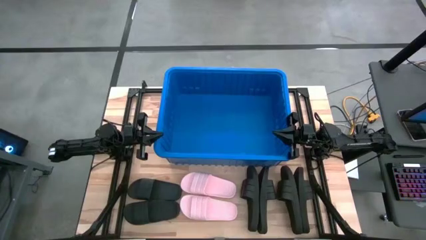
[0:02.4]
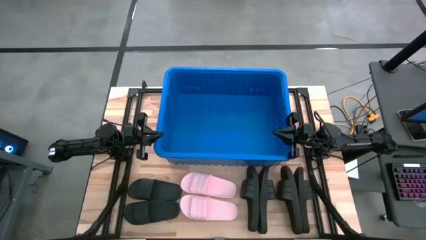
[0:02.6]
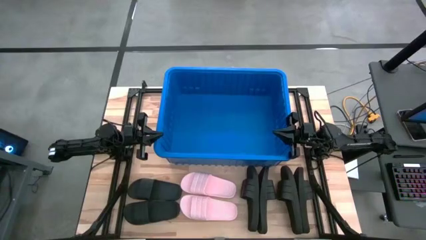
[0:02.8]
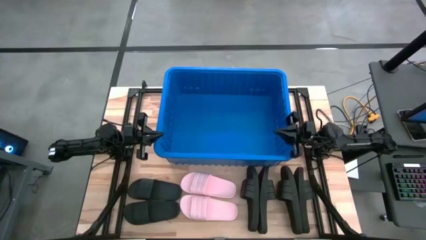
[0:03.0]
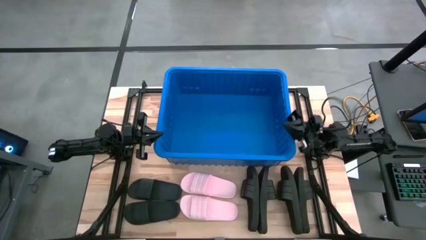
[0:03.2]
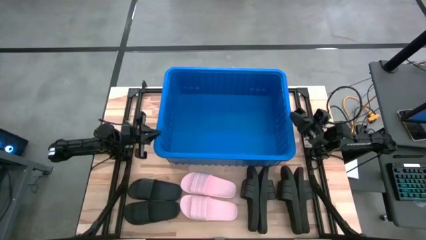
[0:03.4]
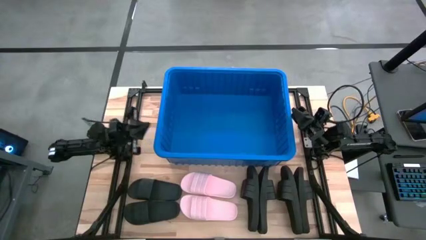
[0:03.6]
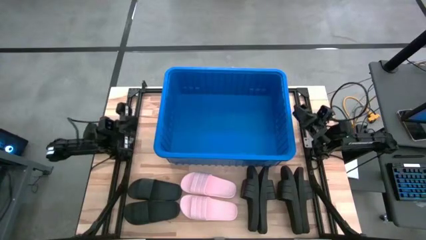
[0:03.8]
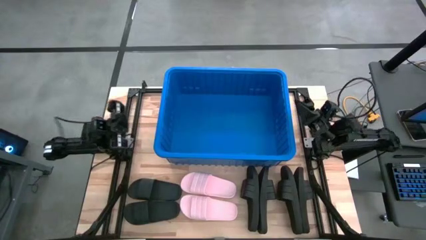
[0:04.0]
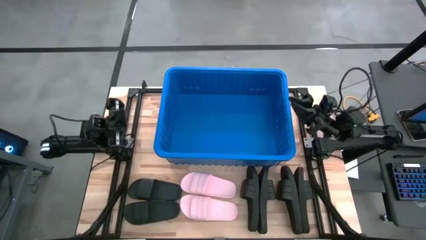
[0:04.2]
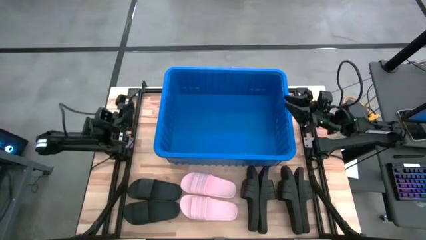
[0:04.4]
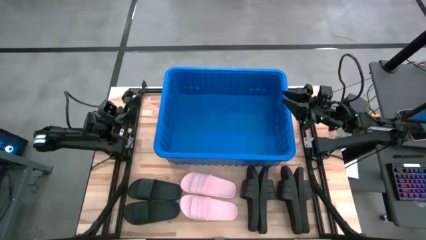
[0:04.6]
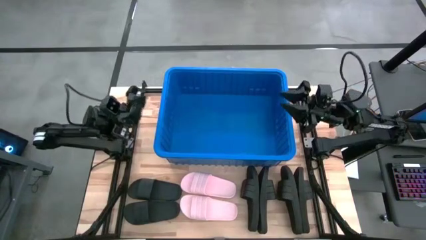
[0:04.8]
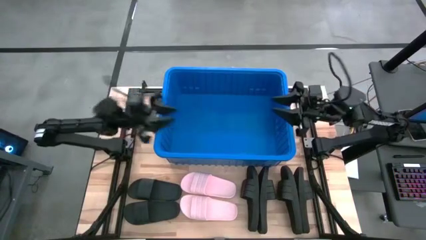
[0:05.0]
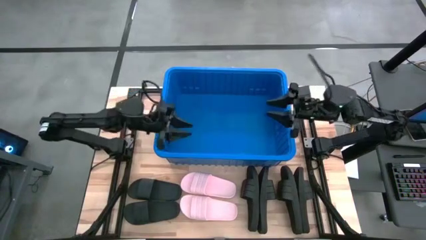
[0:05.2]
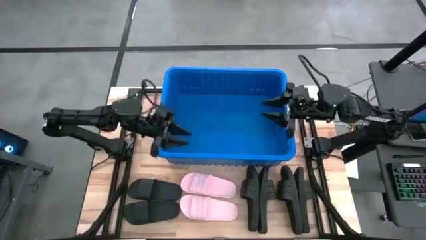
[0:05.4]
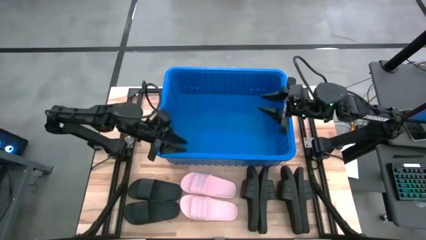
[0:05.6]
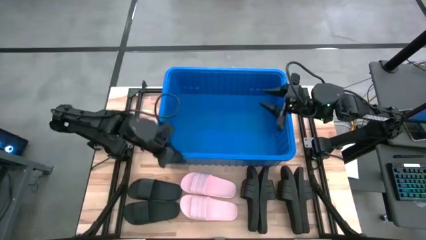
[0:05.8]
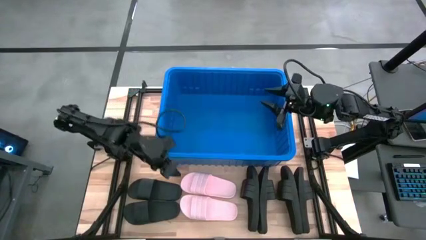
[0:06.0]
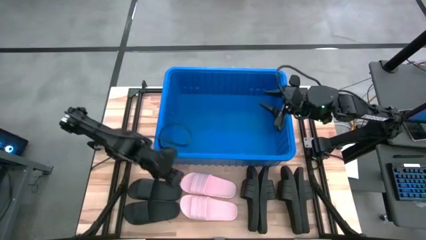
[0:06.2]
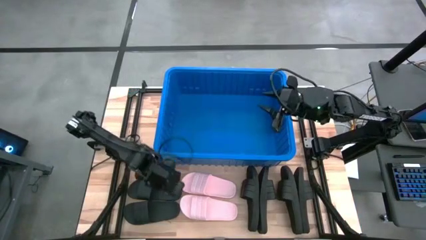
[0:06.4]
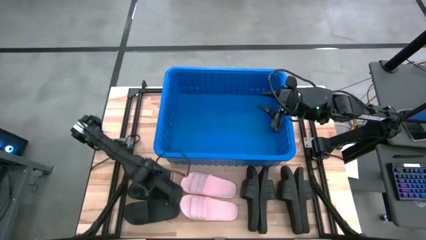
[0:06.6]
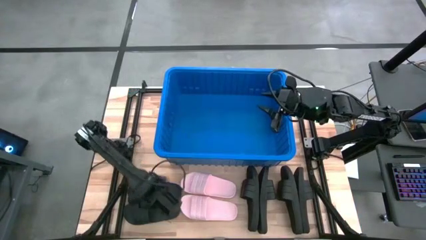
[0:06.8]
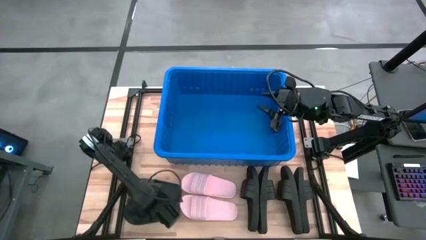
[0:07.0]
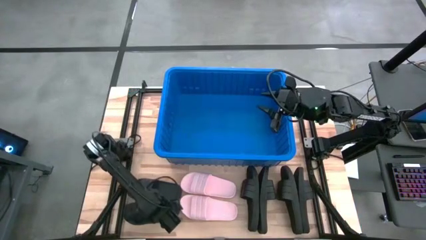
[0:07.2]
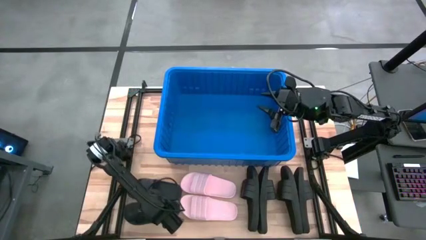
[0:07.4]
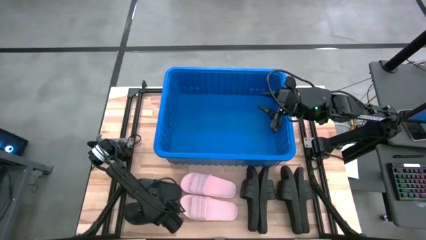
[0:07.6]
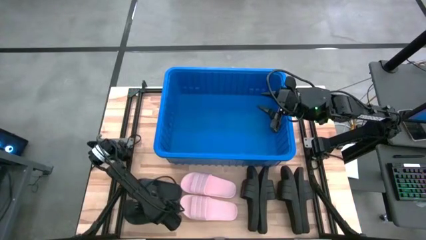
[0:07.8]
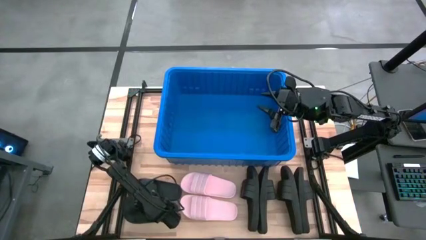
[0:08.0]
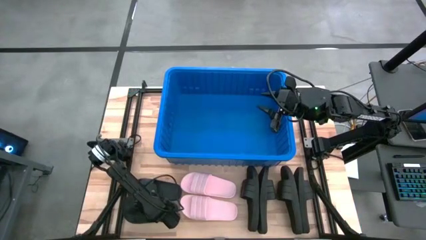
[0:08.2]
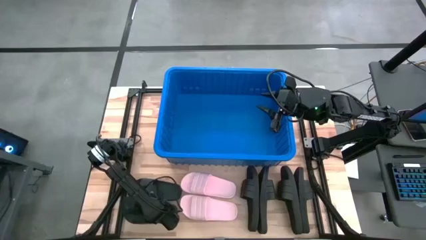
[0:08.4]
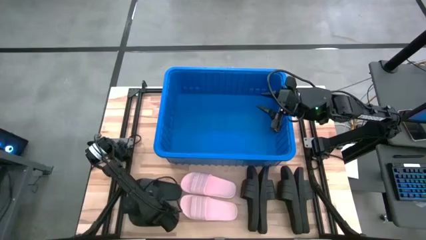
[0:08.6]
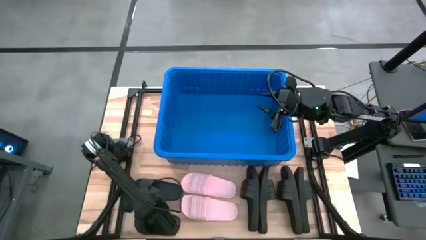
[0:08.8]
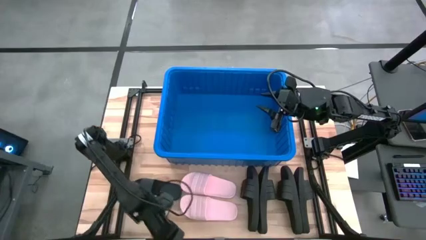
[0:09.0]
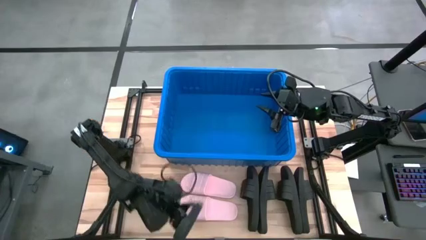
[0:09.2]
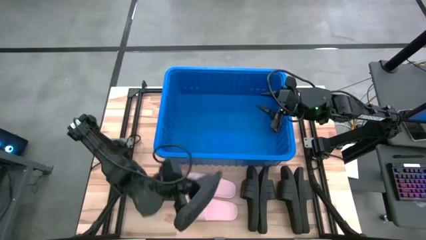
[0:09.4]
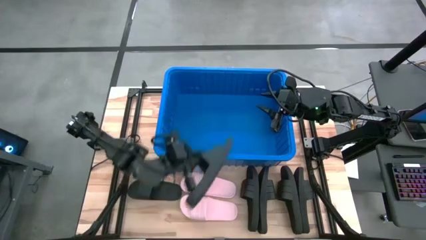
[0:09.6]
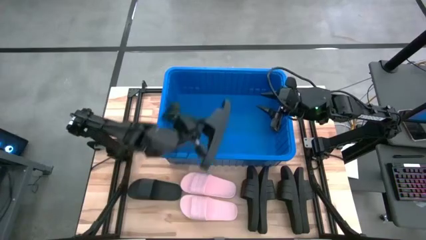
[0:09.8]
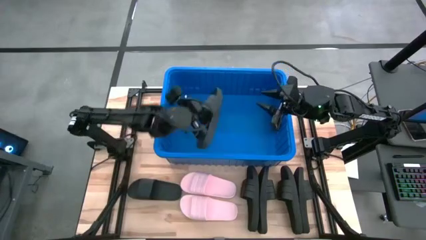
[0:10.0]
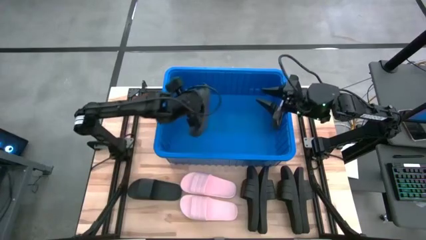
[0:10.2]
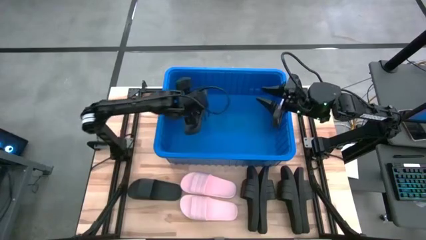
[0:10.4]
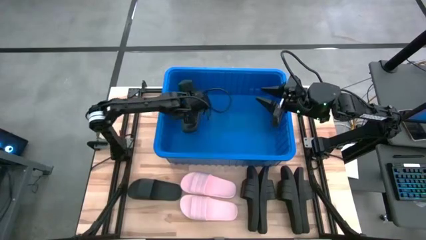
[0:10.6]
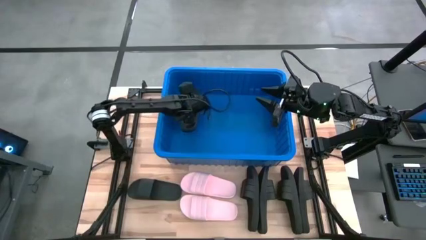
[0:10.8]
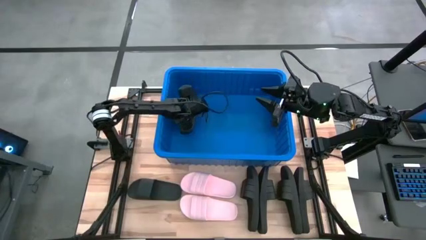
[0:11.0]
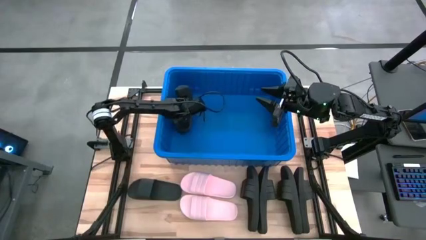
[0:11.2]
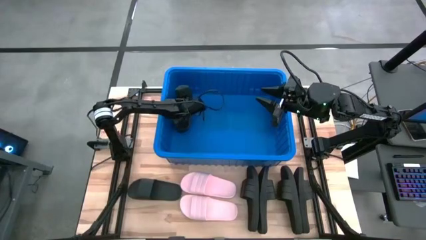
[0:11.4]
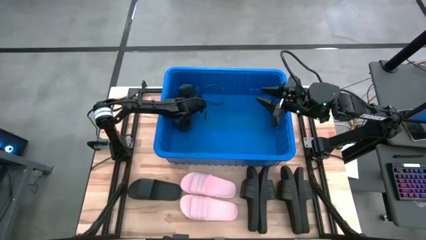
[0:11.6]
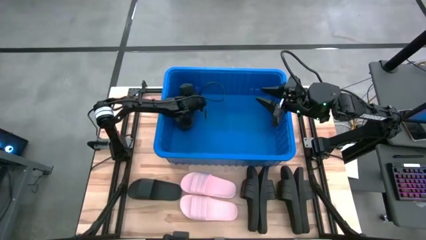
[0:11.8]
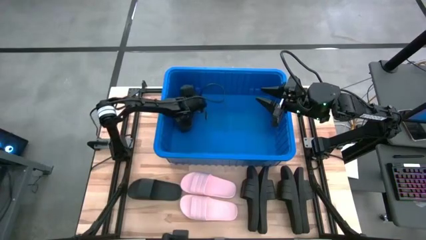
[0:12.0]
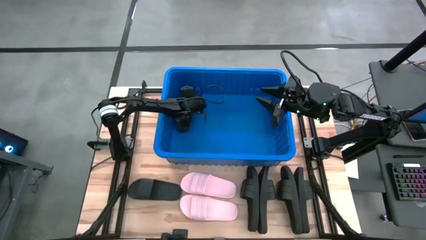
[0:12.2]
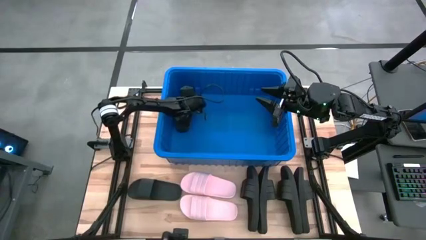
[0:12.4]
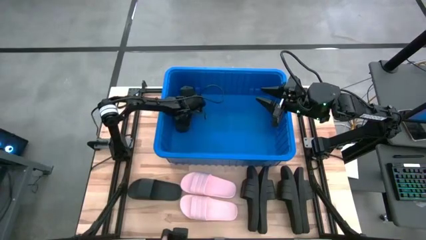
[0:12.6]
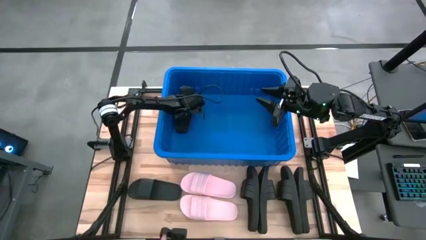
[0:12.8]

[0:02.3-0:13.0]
Task: Pick and place slides into bin
Put the black slipper into the blue container

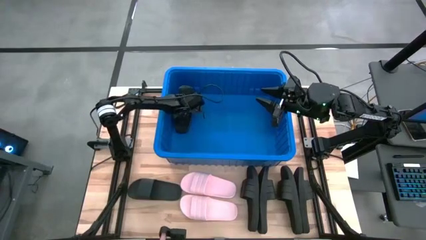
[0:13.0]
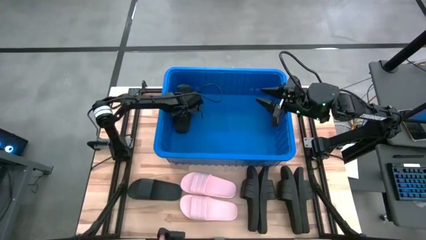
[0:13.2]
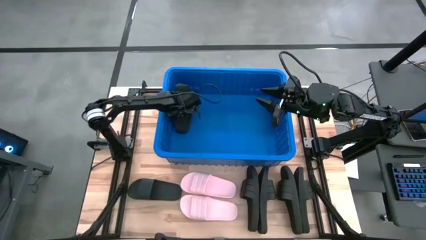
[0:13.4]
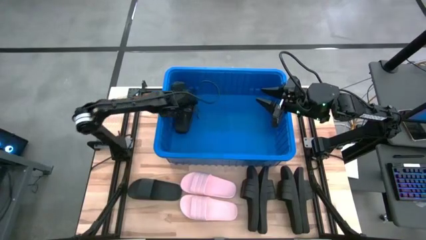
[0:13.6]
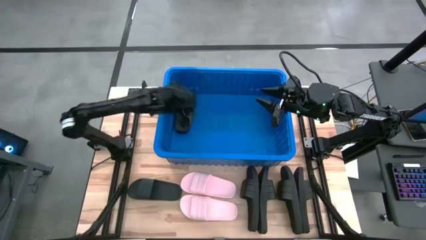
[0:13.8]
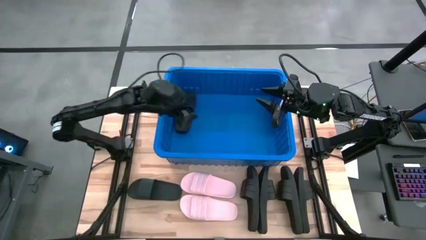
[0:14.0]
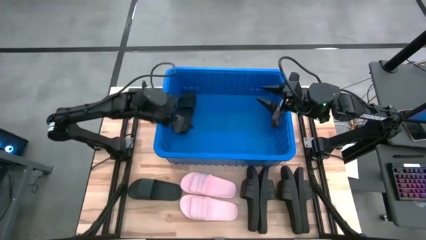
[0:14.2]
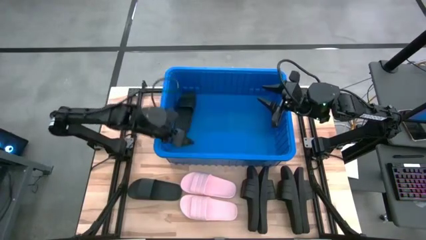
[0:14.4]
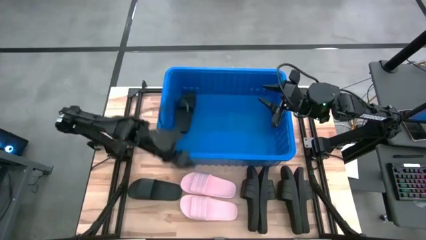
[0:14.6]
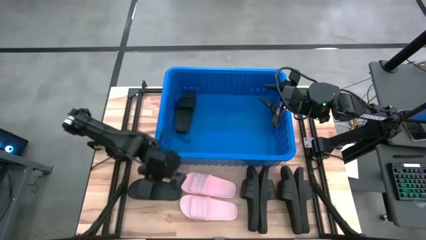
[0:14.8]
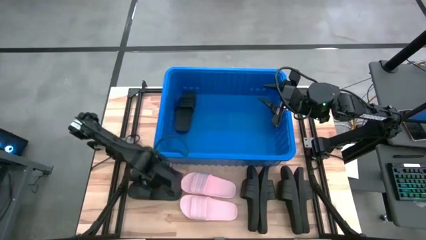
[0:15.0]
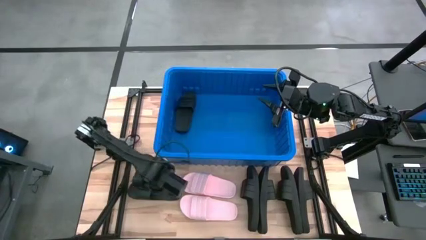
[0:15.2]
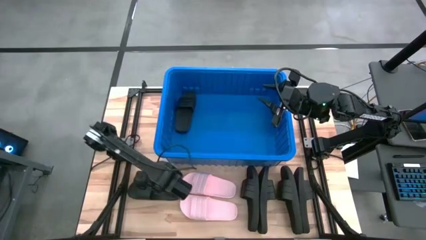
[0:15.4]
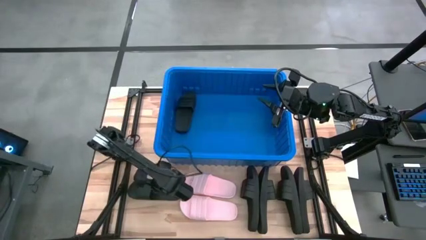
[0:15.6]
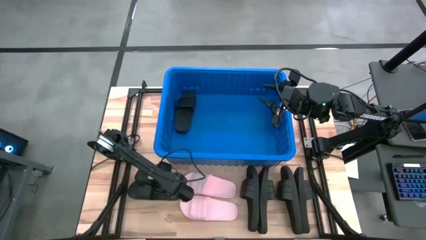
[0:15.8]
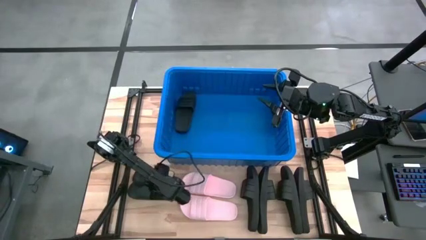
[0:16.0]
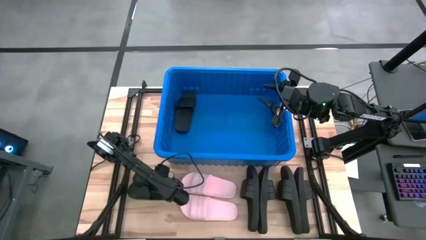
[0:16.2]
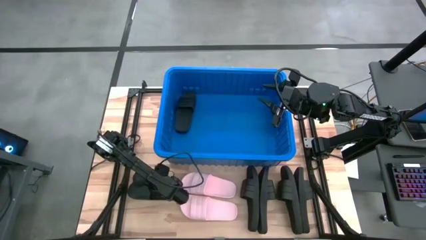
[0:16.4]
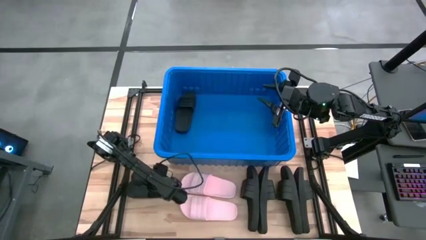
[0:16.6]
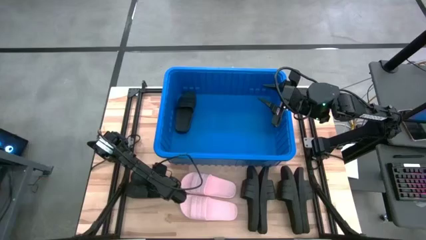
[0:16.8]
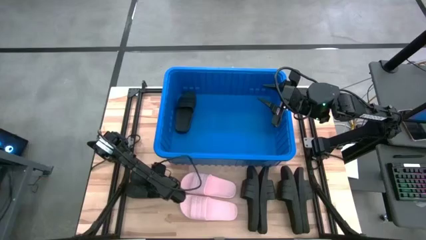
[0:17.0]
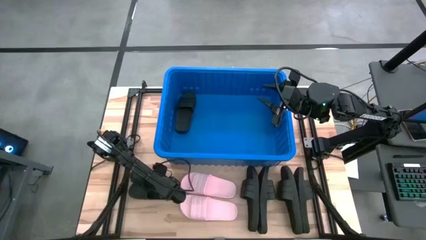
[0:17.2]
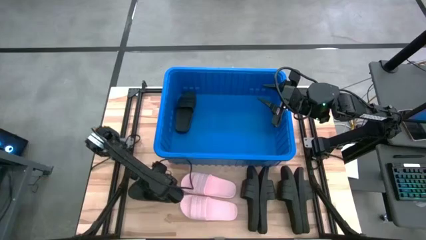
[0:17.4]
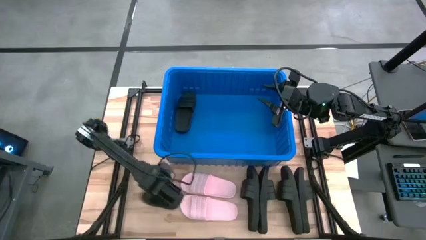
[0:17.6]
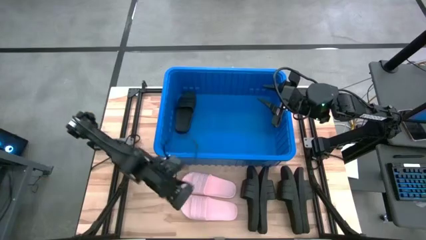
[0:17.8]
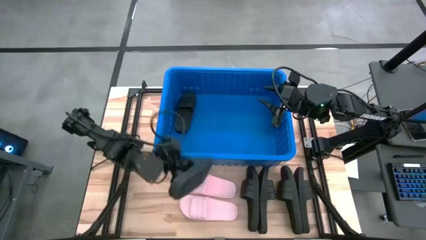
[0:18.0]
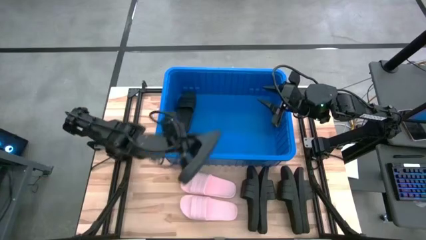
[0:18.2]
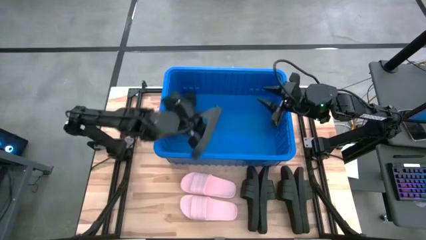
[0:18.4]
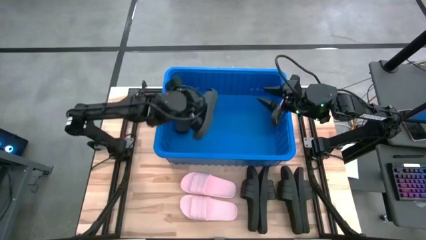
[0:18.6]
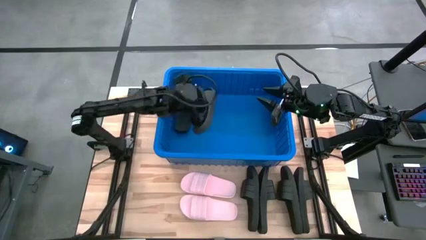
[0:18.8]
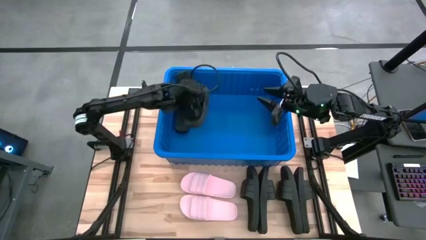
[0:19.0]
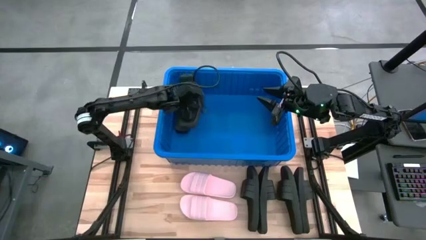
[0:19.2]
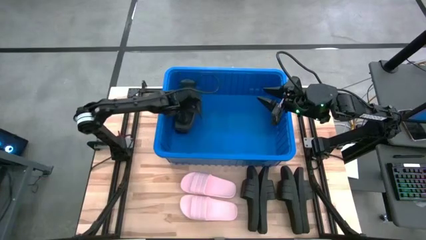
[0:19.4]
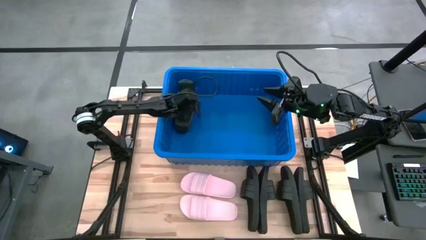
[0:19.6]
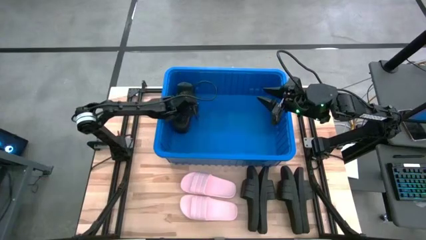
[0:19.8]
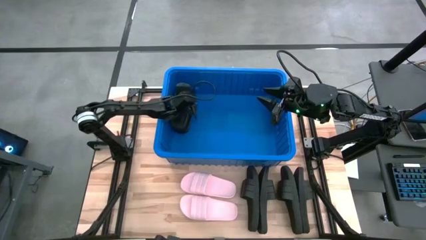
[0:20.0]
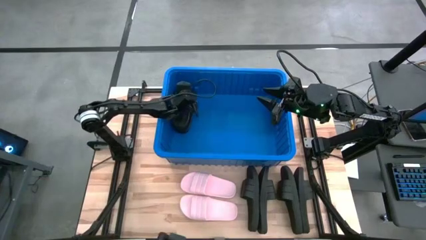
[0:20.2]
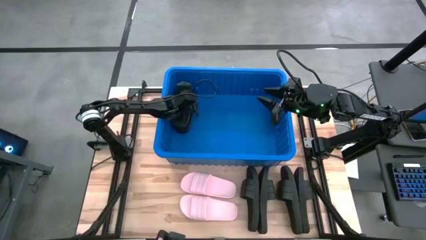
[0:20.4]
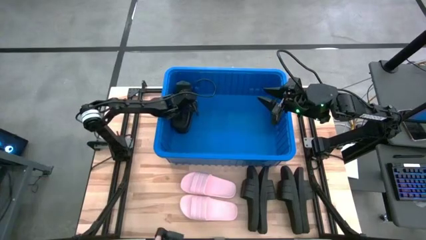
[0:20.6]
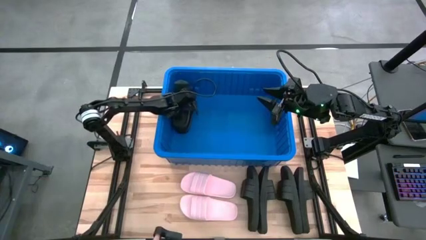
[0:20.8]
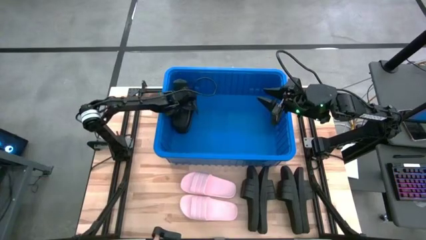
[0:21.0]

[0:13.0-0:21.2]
Put the black slipper into the blue container
